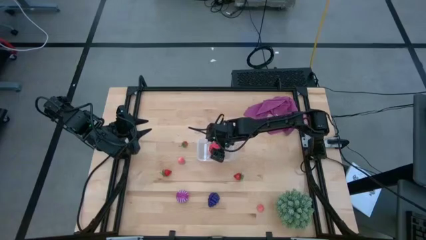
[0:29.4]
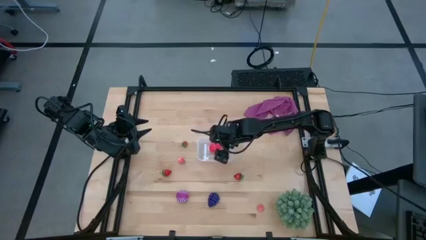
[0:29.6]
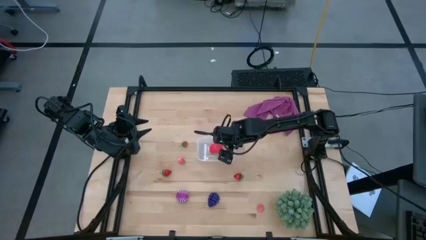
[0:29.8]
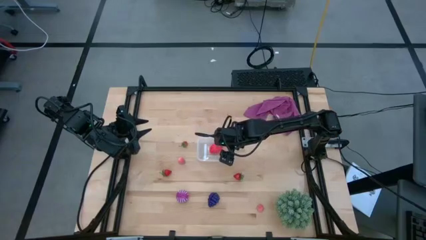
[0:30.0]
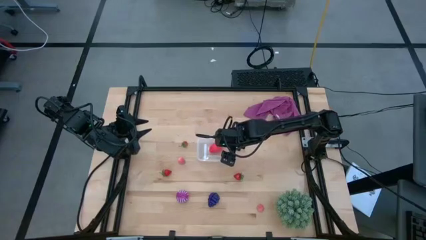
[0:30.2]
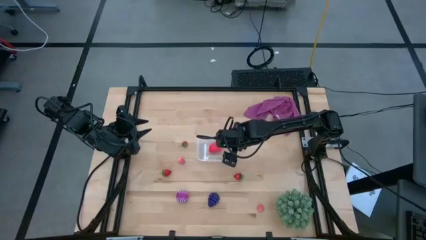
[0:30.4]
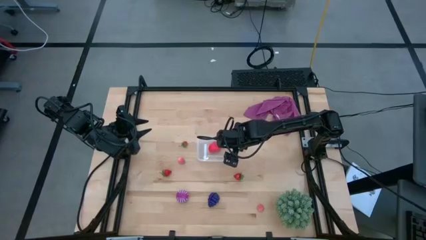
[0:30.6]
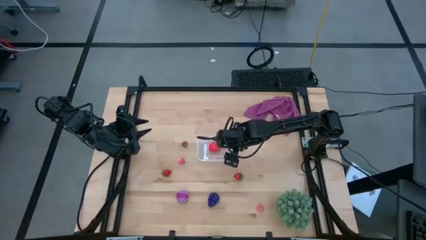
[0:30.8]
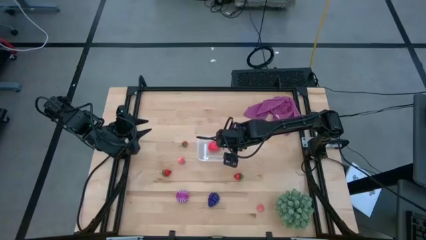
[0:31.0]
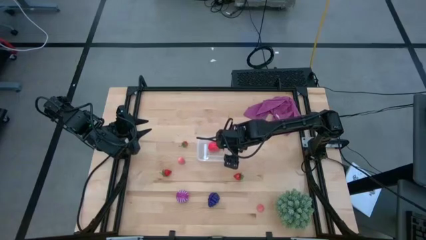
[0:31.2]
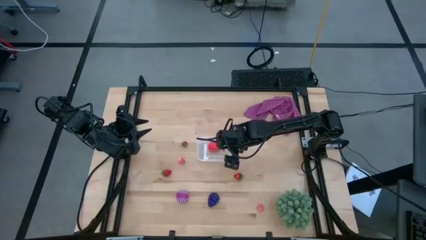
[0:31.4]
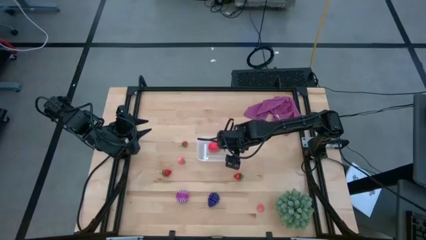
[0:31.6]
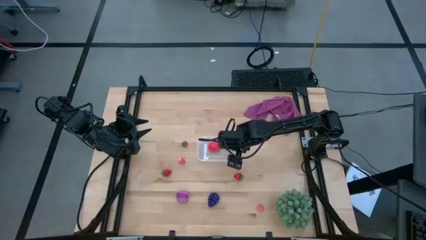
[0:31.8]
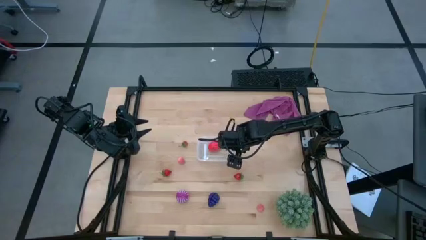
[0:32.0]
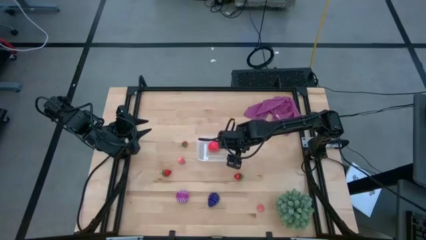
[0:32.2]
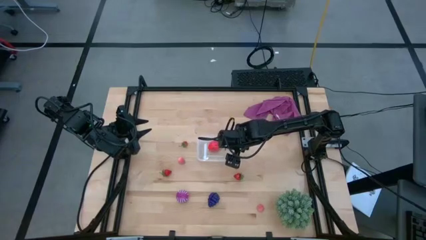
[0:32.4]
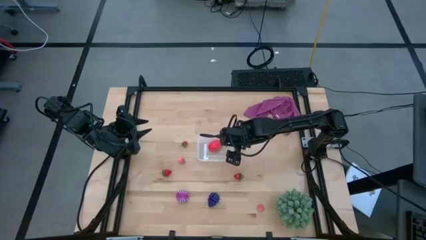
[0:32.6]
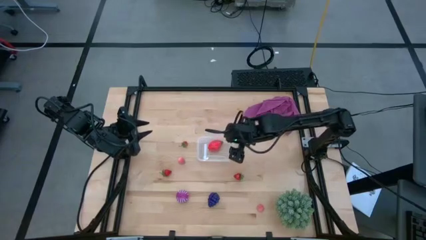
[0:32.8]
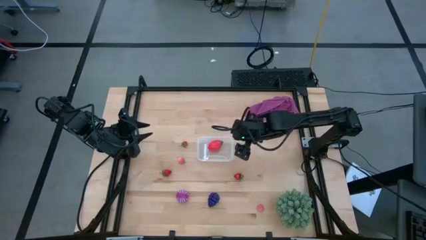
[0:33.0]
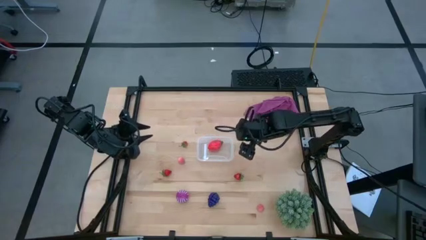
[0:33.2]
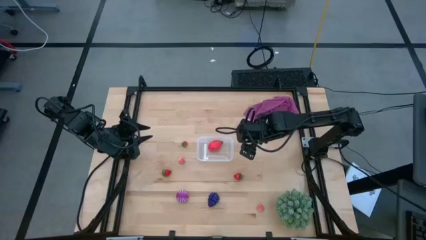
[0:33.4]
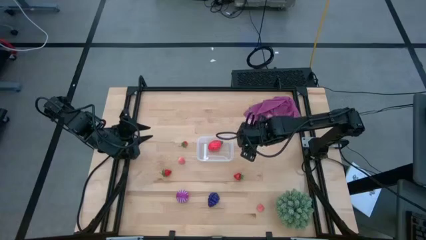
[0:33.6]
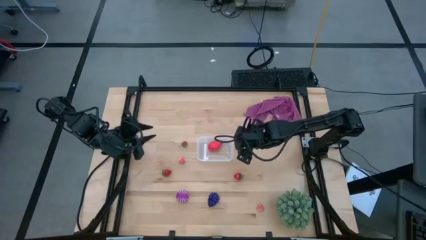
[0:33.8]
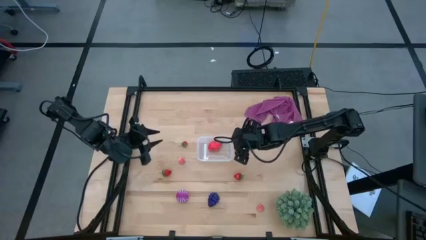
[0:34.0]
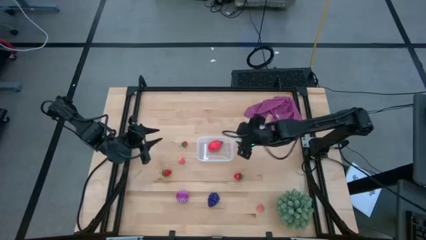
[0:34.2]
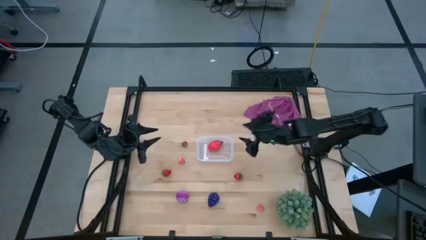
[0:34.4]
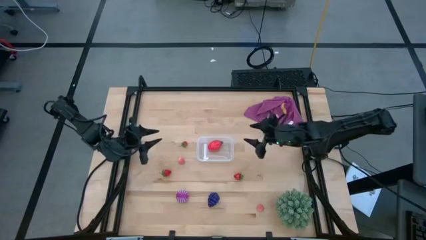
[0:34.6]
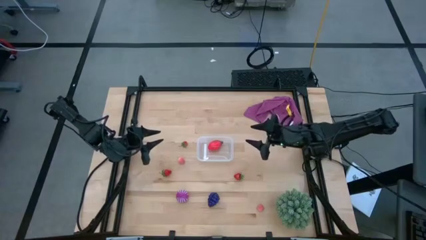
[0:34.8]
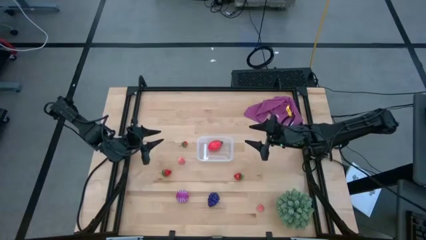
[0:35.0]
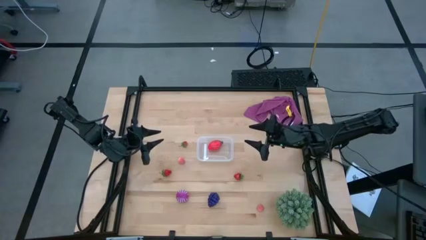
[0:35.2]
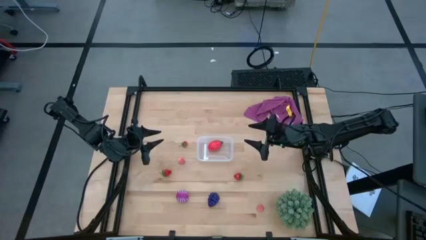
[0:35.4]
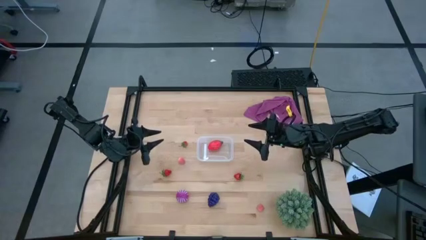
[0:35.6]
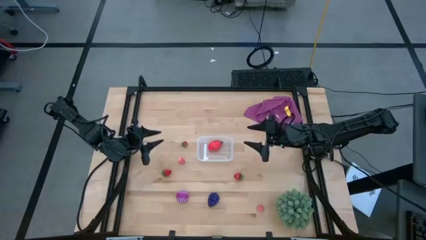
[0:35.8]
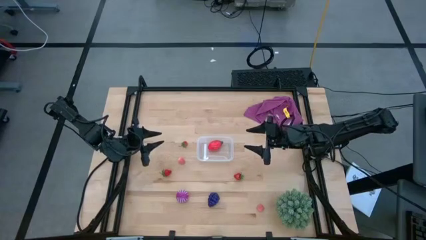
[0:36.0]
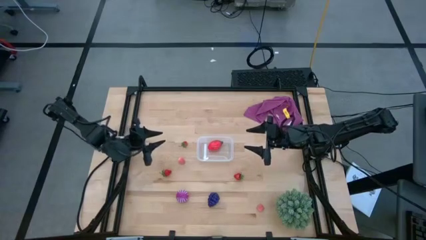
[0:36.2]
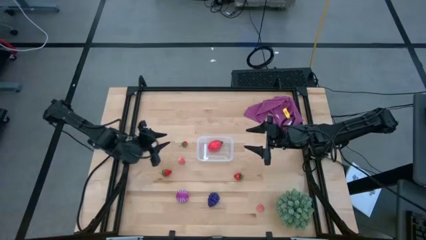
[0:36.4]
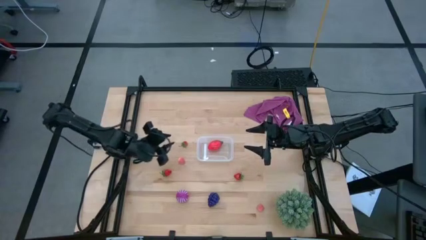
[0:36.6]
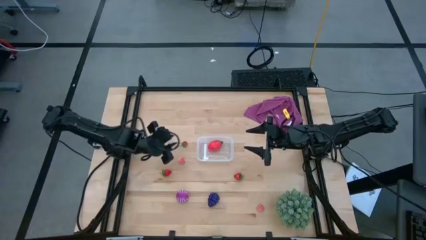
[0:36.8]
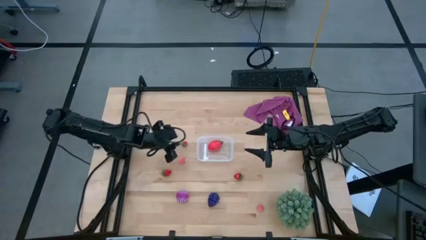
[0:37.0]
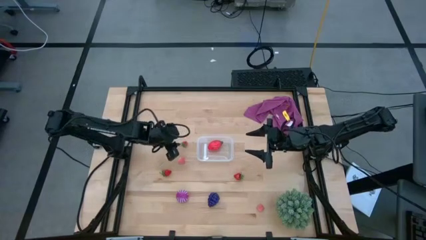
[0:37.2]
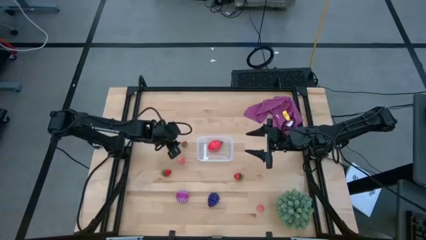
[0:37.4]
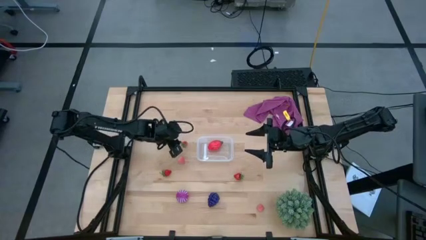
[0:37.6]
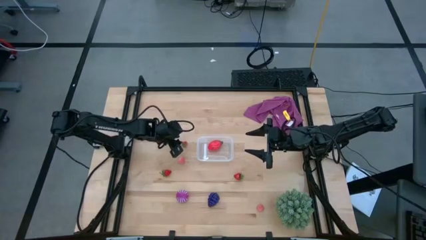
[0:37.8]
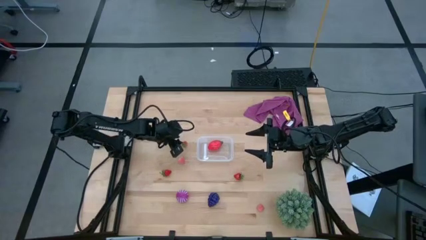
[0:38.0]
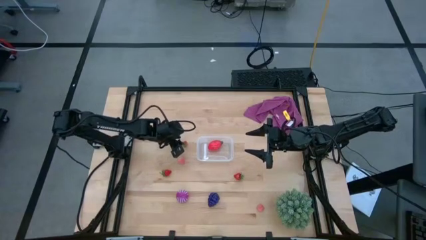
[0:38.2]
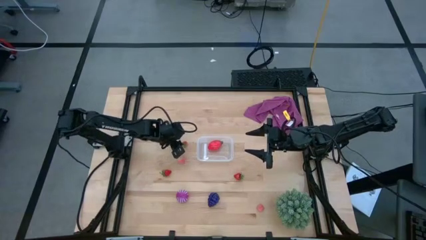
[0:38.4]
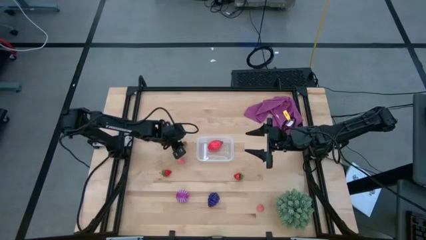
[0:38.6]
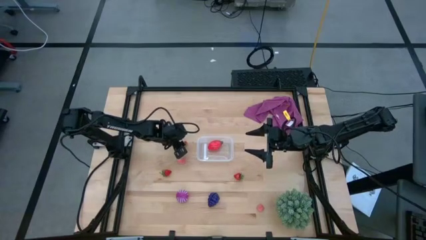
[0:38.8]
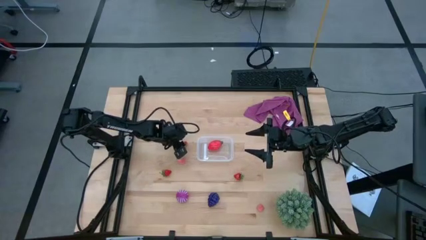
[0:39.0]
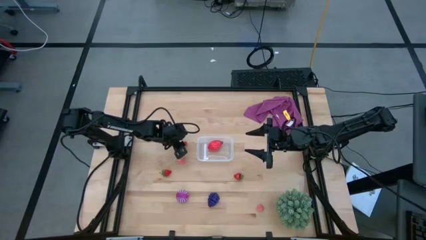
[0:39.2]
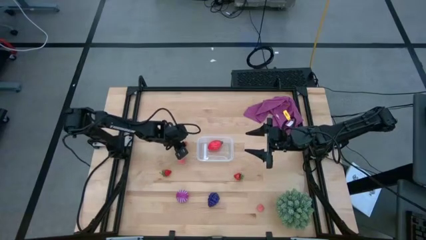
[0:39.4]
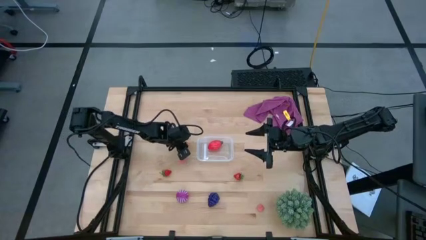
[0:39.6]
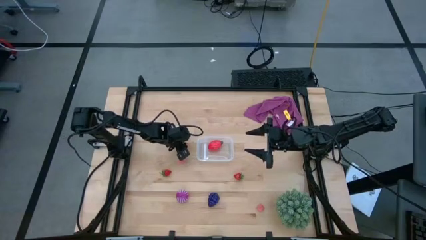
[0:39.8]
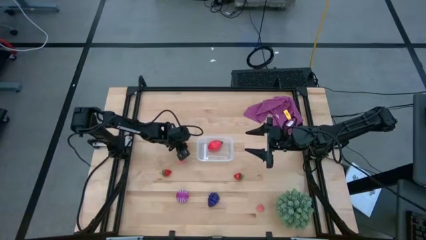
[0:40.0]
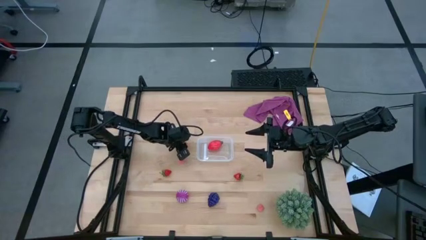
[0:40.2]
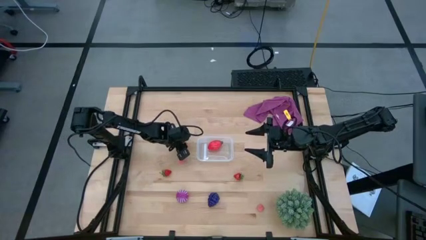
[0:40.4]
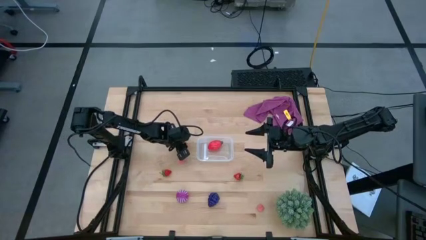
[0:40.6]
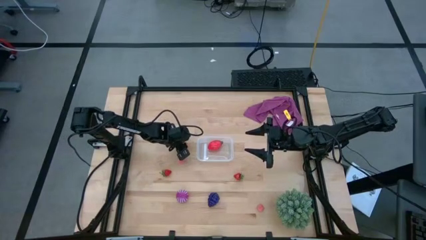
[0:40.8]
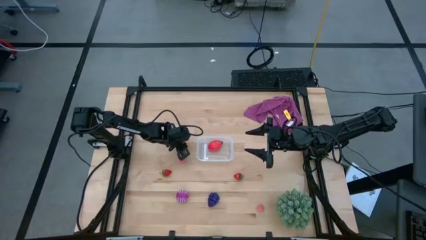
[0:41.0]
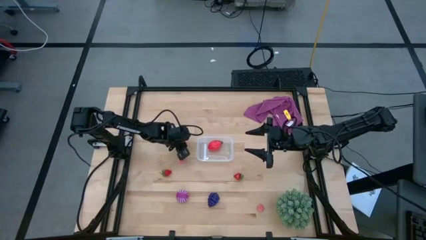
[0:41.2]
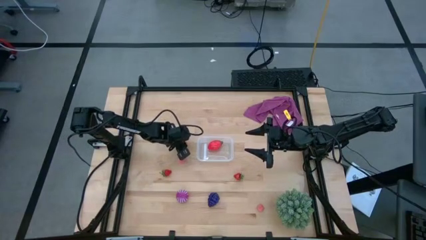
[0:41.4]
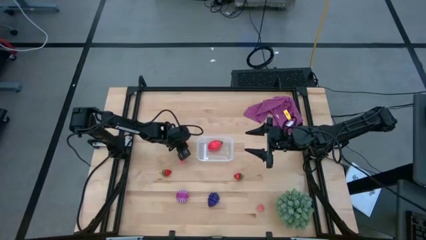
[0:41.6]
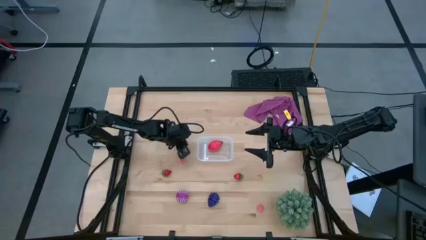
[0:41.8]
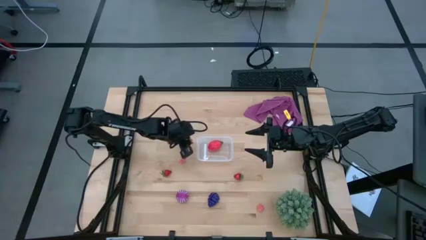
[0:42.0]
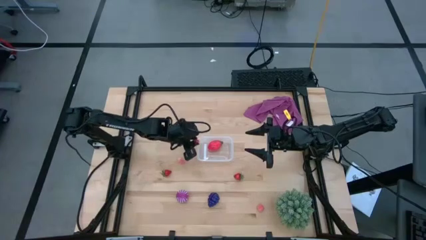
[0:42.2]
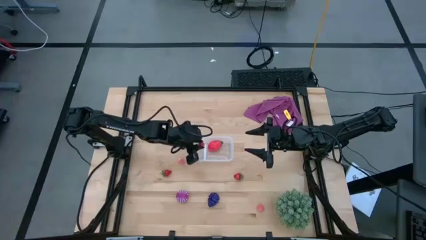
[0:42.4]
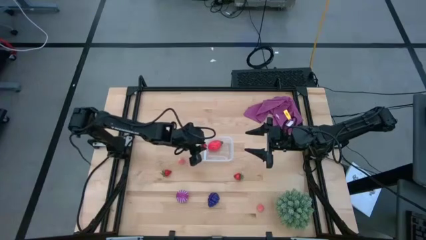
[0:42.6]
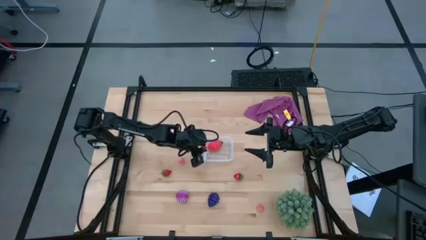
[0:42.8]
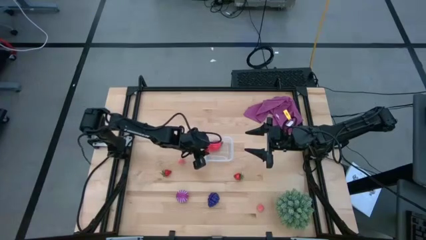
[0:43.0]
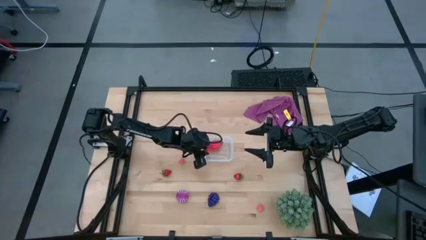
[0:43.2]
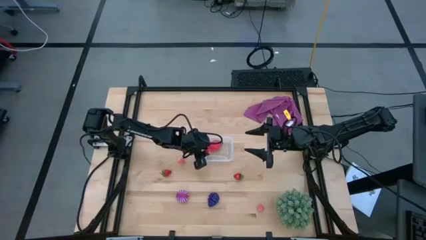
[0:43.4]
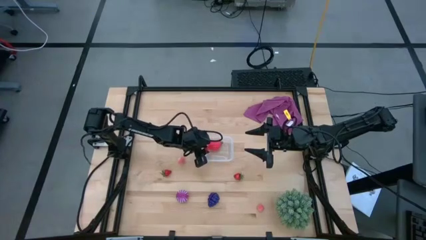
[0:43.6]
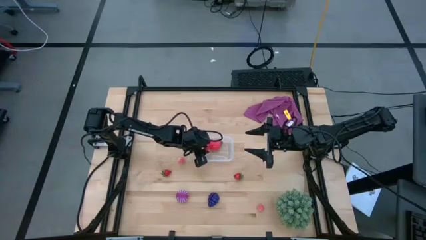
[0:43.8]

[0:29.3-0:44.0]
Task: Pick and placing Produce into tupperware
Put the top red strawberry into the transparent container
